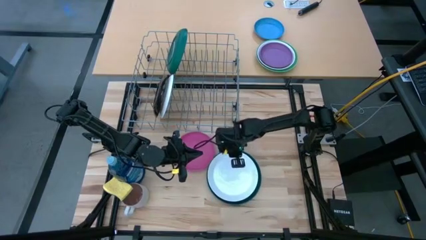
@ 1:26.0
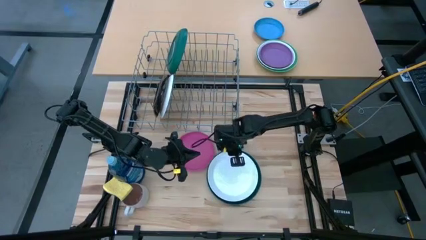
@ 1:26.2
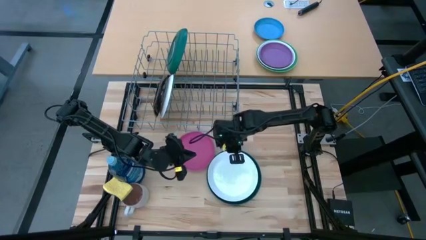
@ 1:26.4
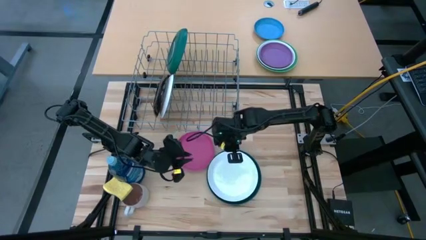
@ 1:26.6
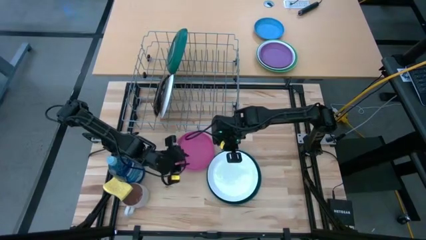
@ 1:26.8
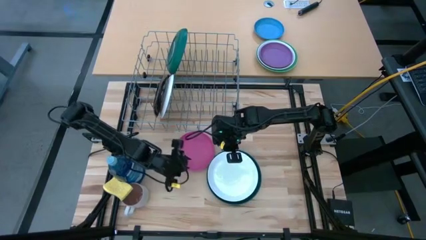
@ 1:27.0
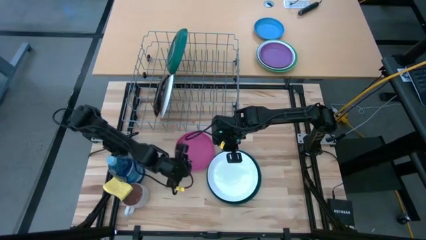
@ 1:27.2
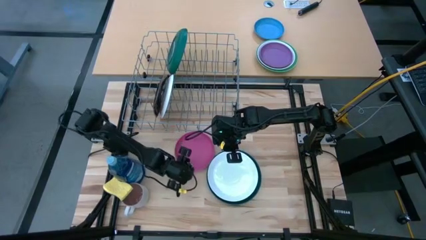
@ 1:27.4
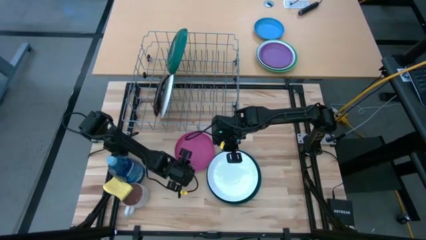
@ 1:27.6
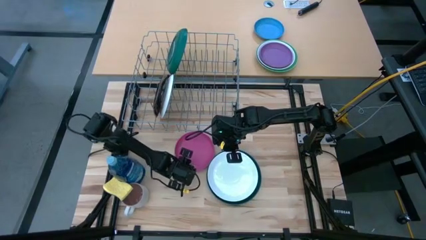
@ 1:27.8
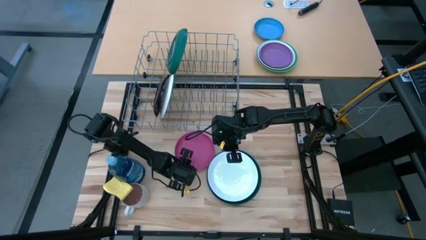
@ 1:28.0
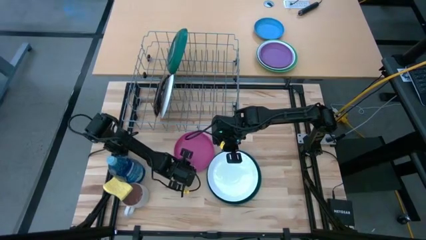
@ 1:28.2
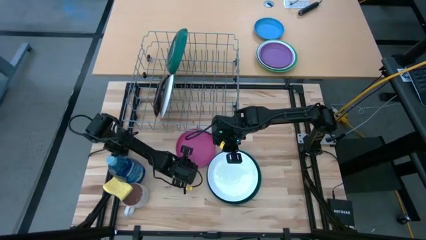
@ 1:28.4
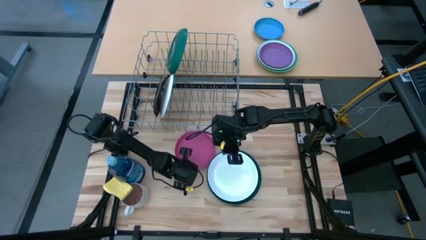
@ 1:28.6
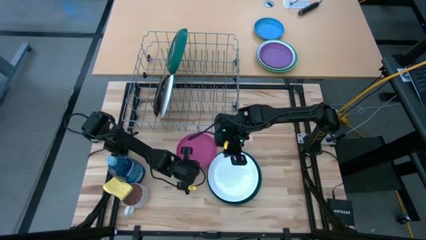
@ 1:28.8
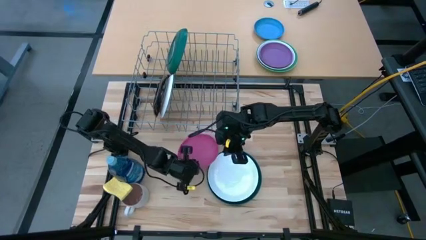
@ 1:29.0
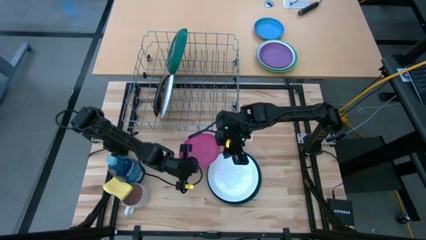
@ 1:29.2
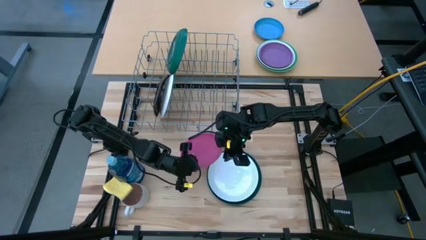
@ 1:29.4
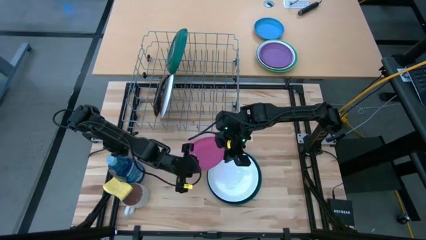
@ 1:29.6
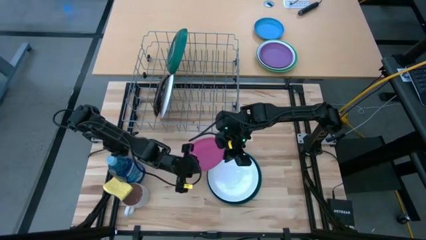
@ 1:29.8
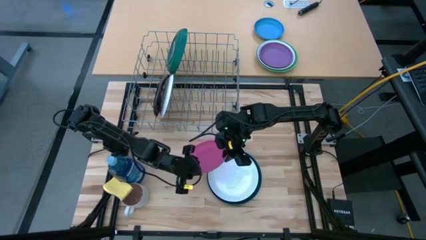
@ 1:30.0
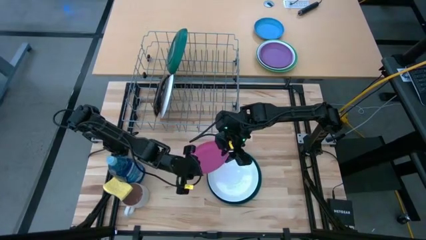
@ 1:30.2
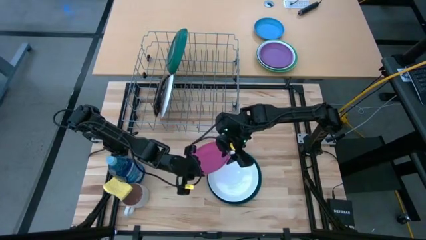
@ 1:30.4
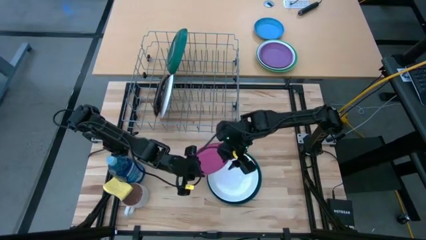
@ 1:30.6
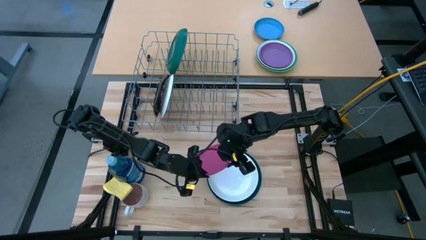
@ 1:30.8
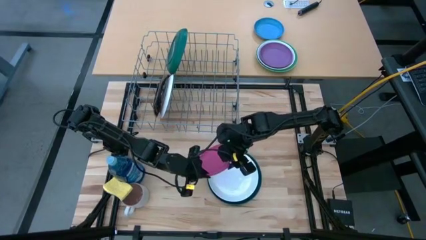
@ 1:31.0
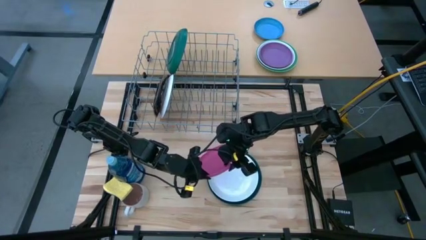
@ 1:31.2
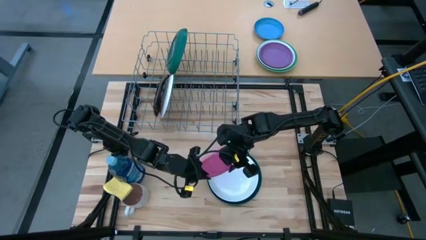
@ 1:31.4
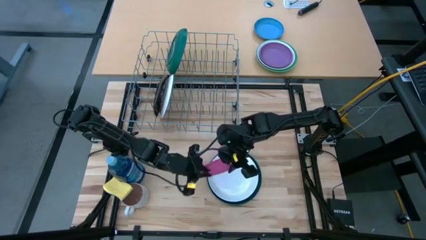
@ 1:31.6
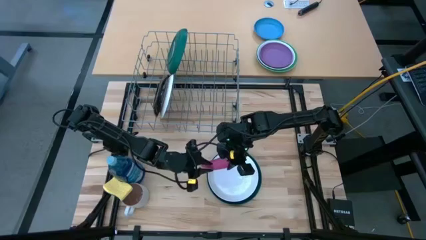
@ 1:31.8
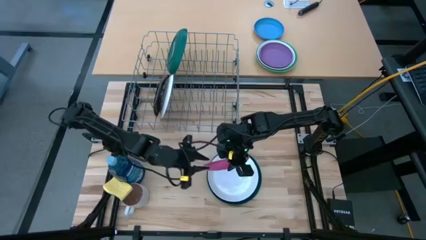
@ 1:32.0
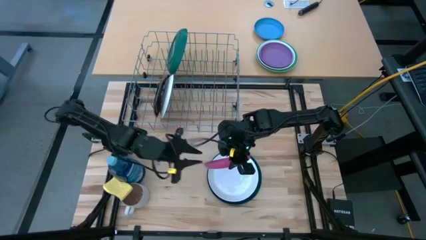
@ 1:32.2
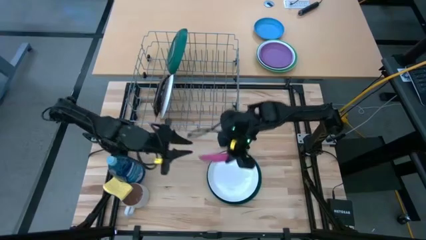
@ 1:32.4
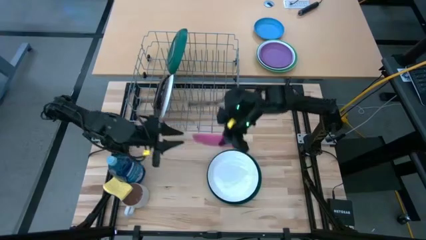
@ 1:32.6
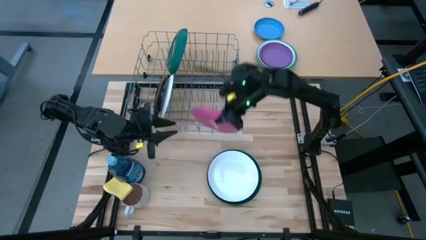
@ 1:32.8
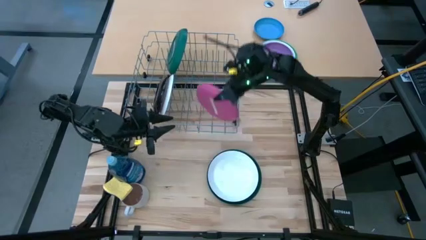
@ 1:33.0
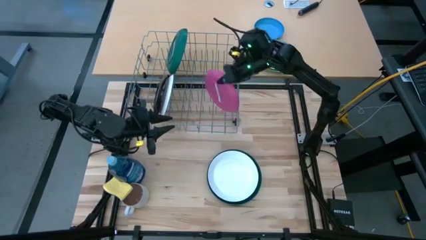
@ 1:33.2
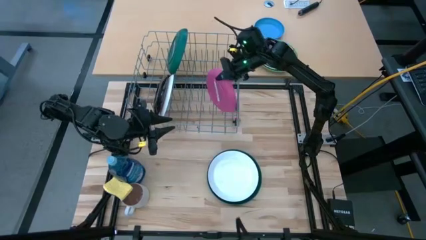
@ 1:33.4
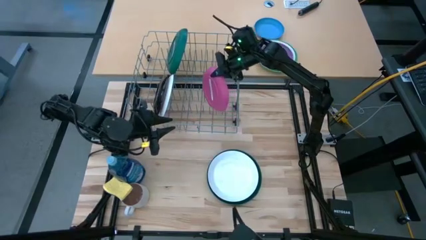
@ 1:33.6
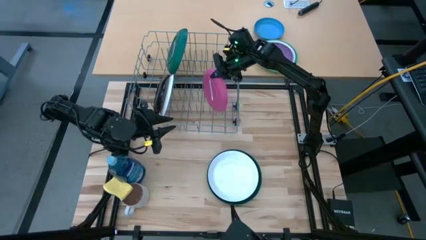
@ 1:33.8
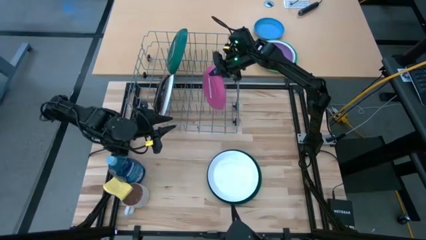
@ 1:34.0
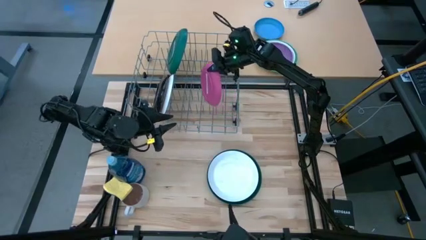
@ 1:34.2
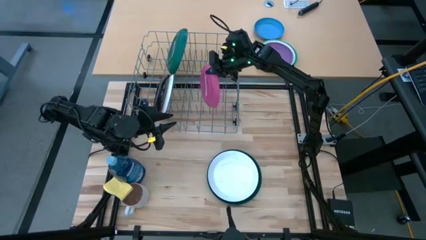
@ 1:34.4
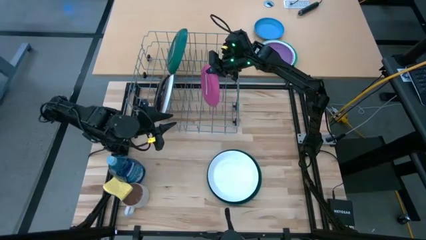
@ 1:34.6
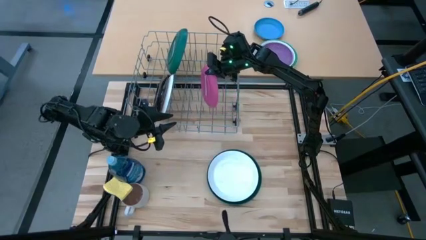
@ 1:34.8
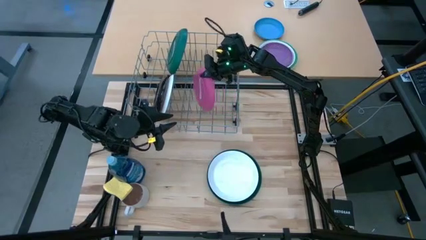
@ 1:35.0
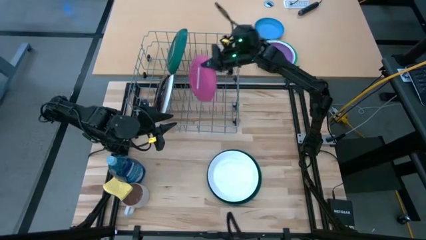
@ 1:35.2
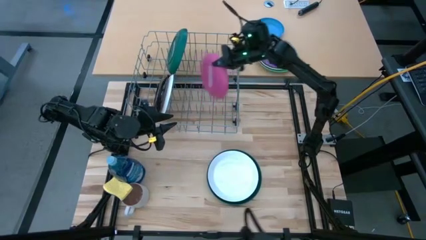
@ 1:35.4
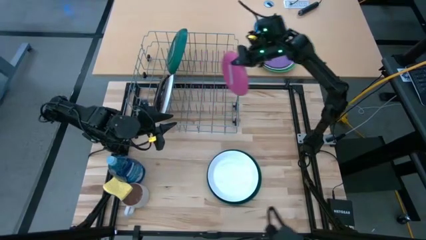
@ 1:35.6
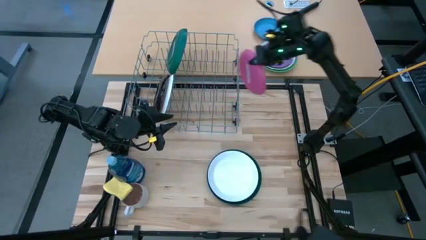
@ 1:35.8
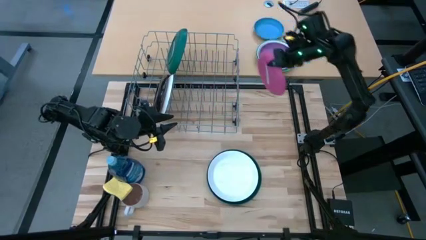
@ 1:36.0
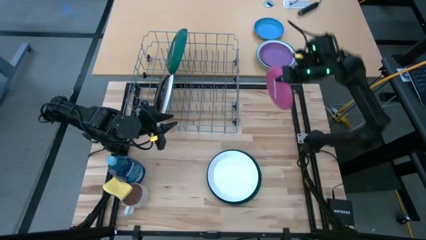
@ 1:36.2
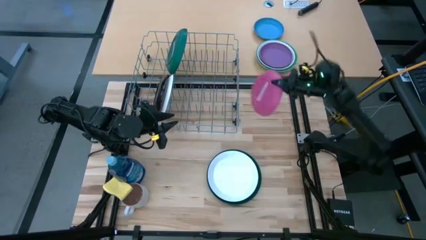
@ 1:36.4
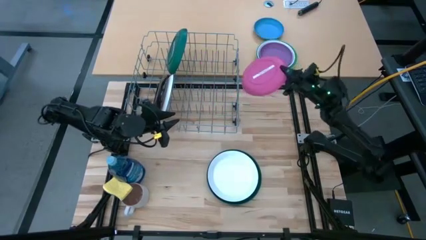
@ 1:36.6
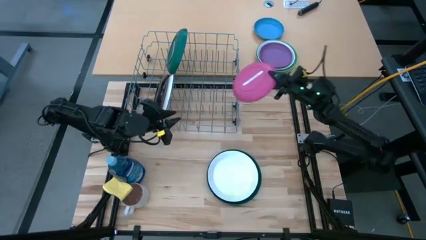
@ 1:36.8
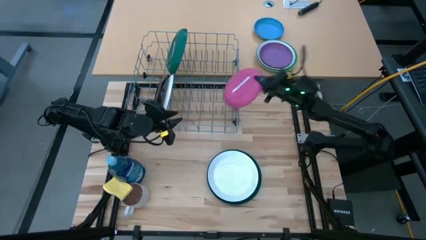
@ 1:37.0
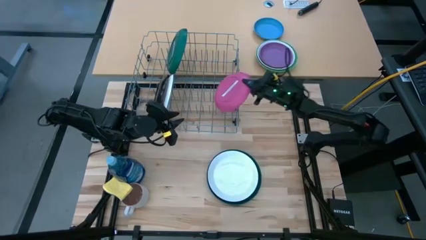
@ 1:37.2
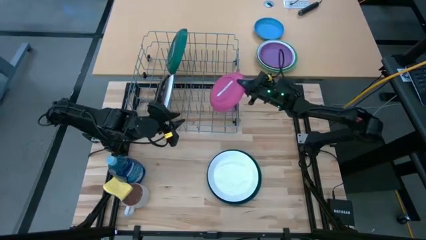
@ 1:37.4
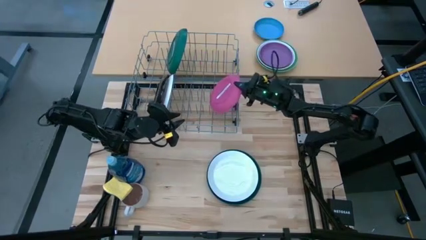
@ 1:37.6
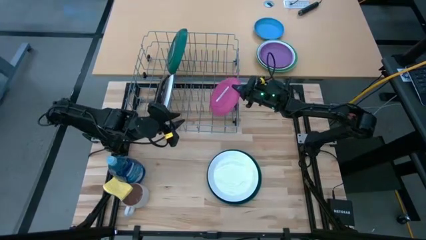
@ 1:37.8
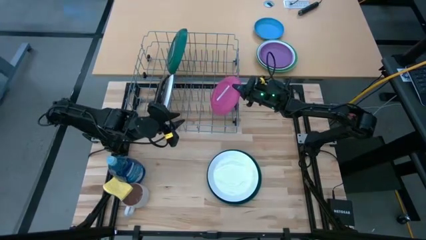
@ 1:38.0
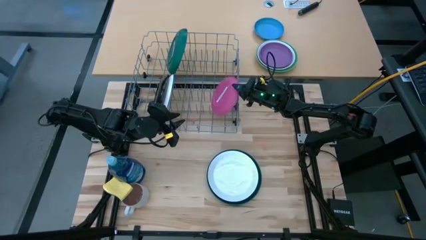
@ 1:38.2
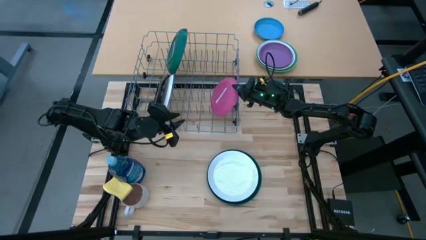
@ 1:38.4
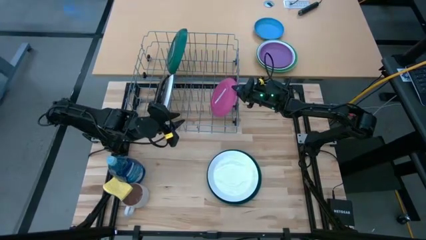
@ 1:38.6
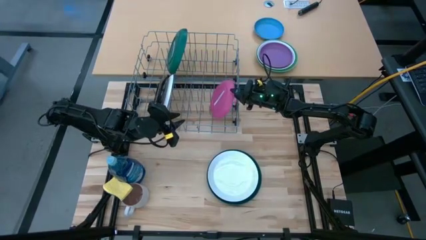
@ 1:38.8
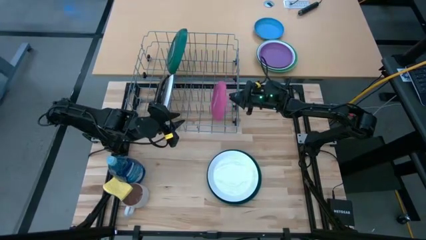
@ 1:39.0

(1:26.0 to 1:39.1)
Task: Sort dishes
Put the pink plate on the dish rack
